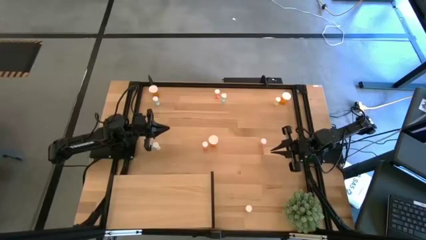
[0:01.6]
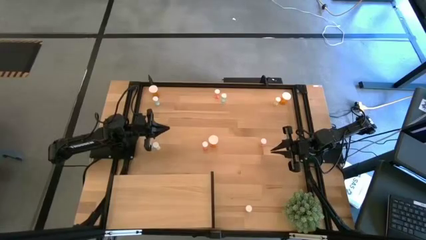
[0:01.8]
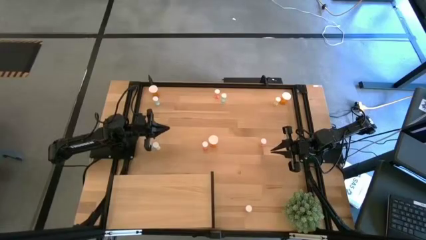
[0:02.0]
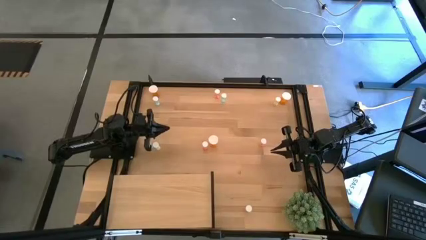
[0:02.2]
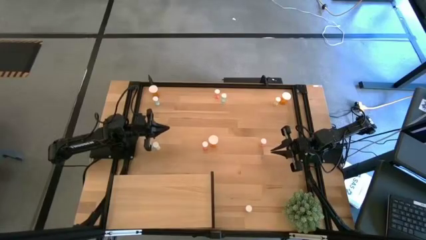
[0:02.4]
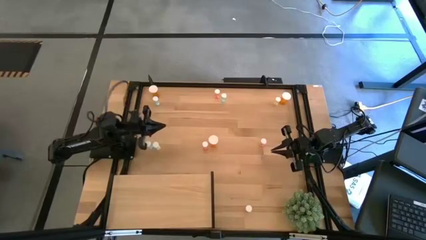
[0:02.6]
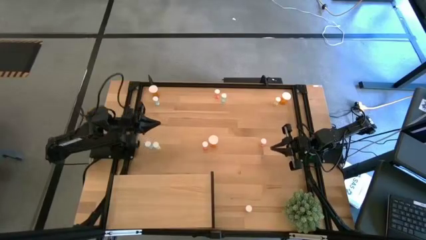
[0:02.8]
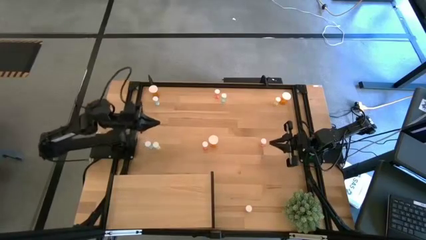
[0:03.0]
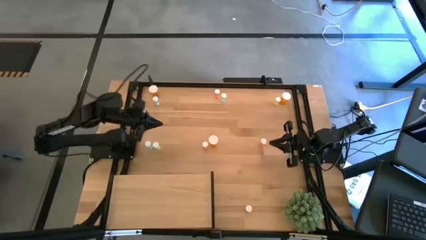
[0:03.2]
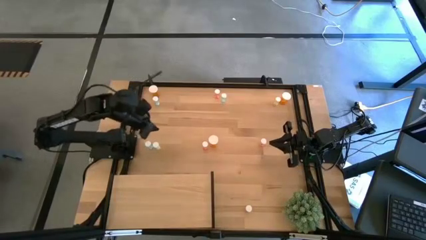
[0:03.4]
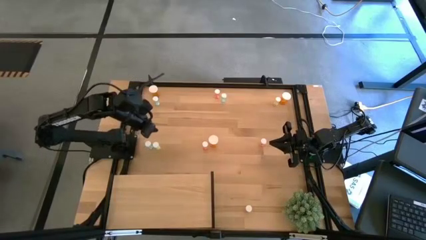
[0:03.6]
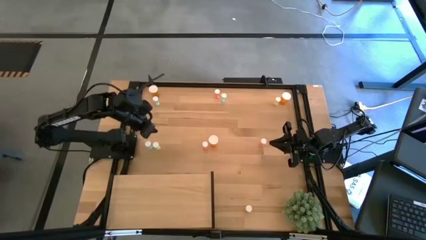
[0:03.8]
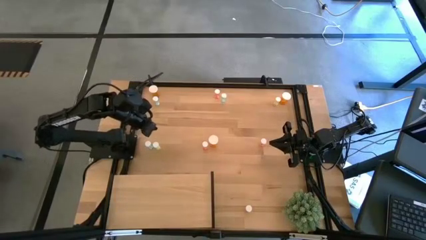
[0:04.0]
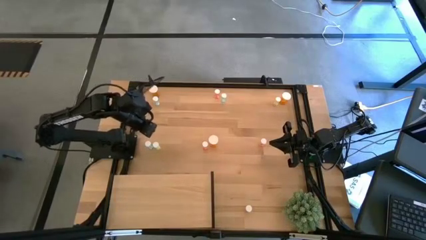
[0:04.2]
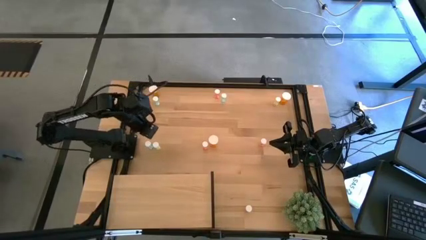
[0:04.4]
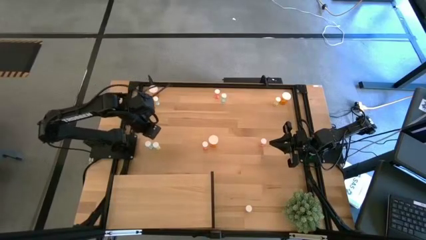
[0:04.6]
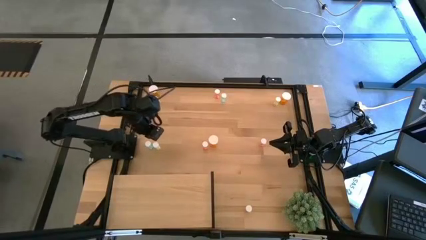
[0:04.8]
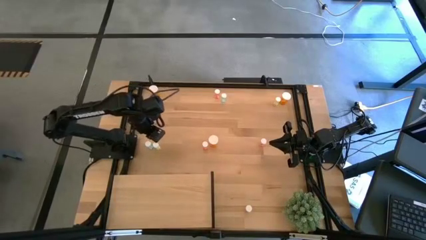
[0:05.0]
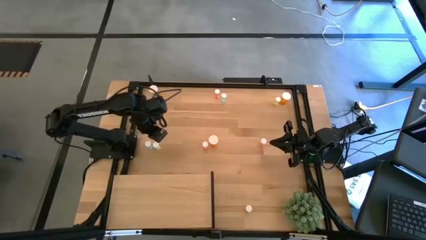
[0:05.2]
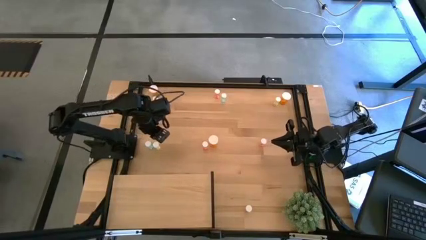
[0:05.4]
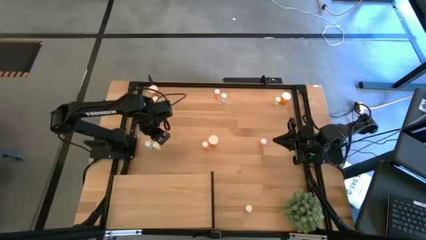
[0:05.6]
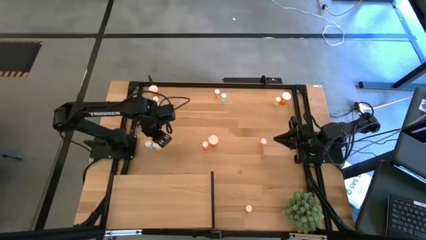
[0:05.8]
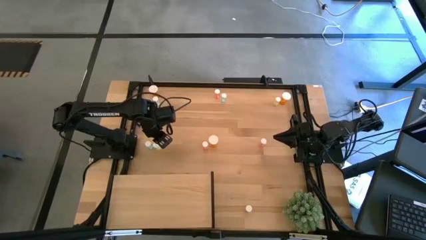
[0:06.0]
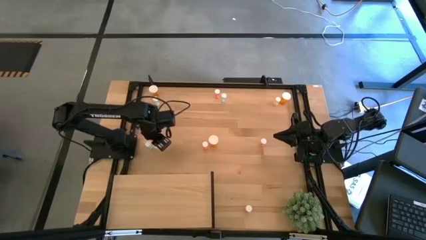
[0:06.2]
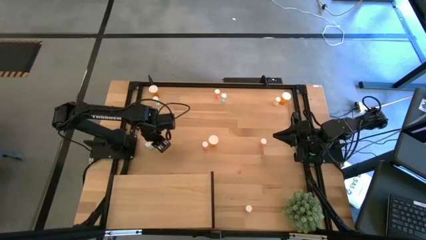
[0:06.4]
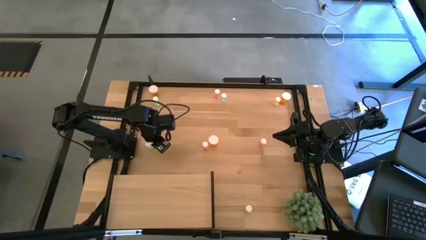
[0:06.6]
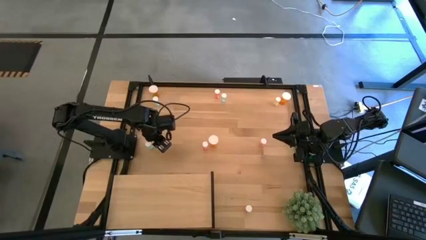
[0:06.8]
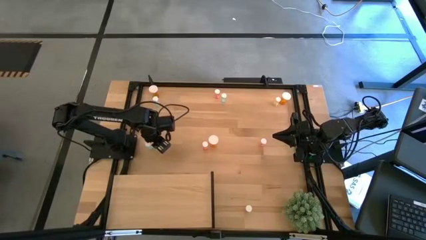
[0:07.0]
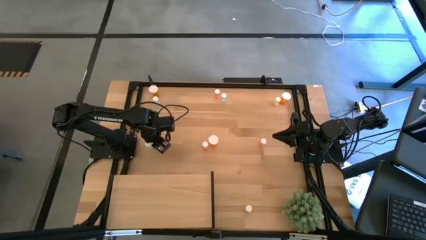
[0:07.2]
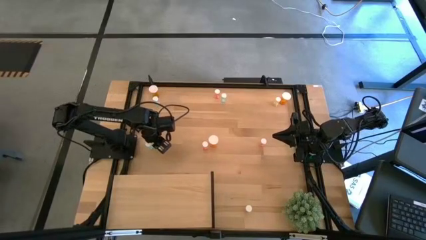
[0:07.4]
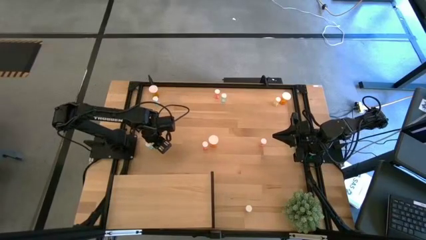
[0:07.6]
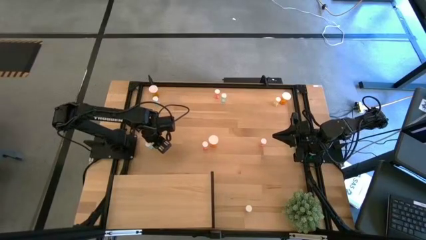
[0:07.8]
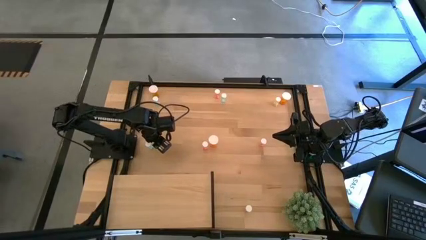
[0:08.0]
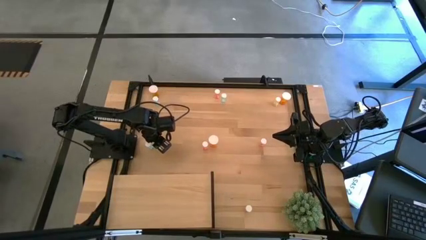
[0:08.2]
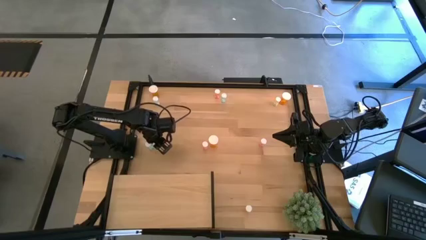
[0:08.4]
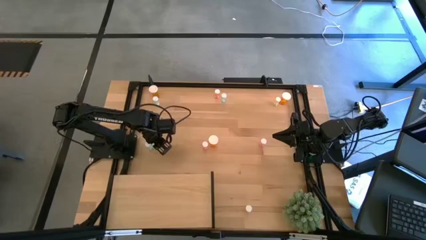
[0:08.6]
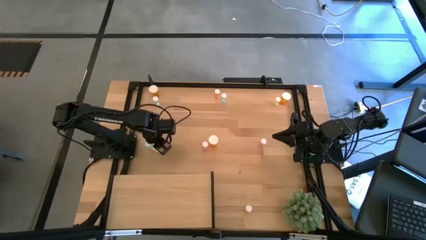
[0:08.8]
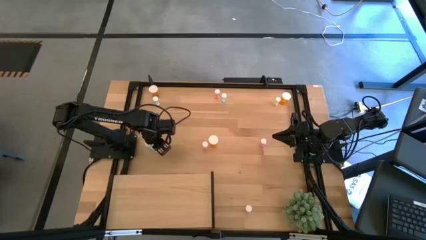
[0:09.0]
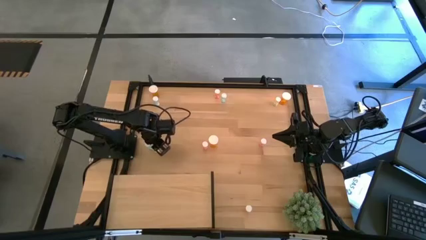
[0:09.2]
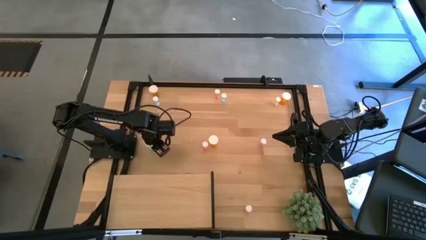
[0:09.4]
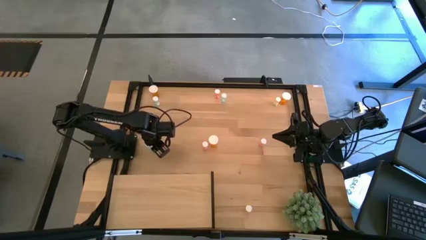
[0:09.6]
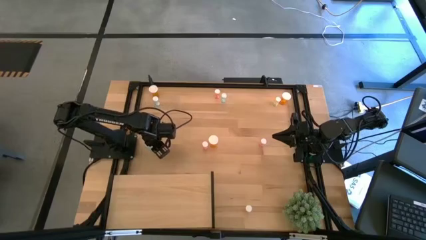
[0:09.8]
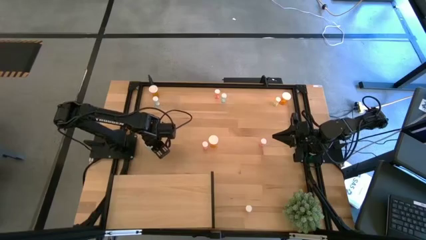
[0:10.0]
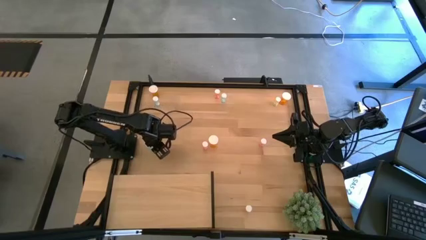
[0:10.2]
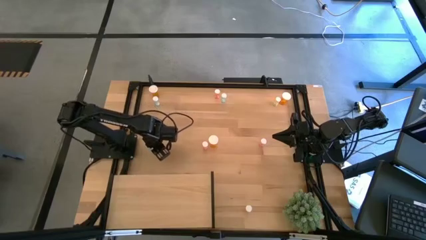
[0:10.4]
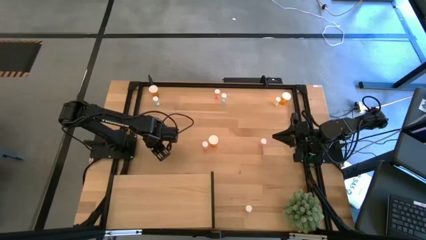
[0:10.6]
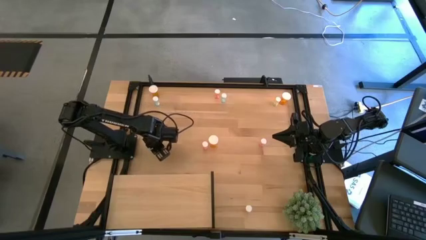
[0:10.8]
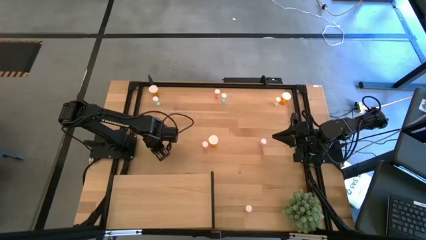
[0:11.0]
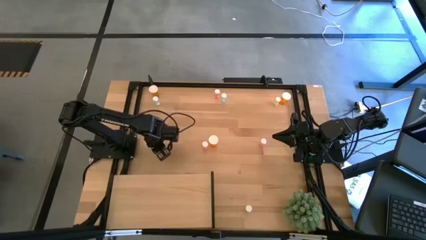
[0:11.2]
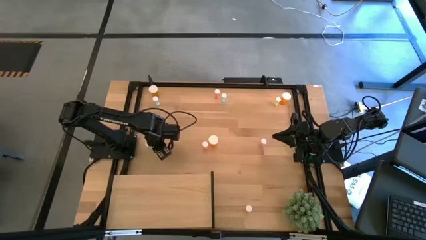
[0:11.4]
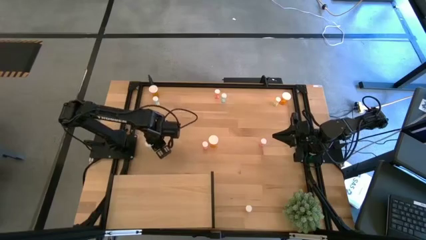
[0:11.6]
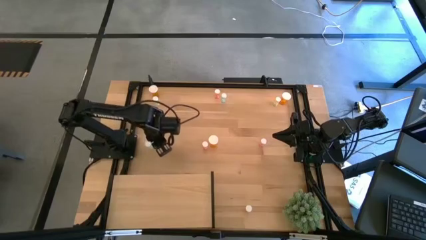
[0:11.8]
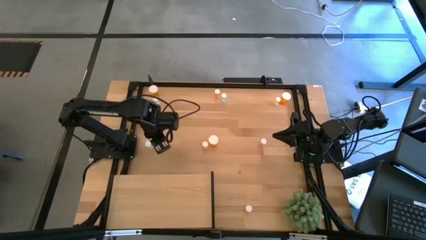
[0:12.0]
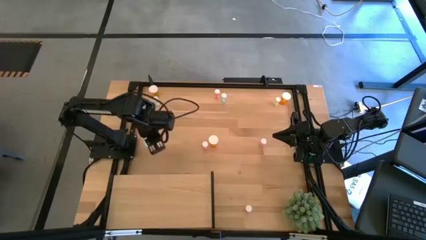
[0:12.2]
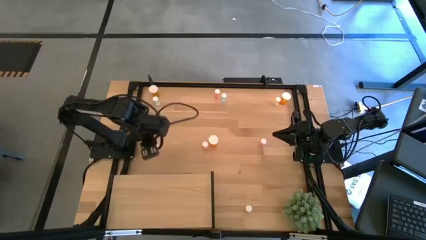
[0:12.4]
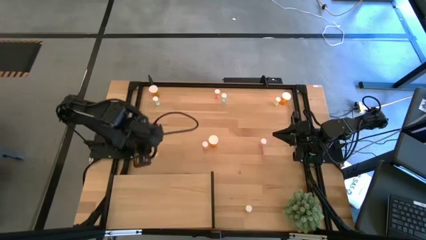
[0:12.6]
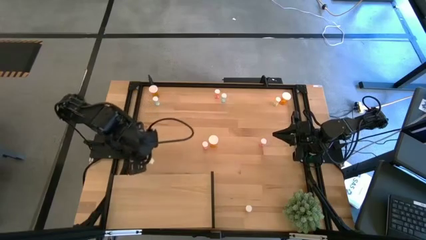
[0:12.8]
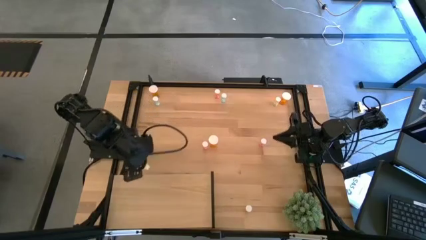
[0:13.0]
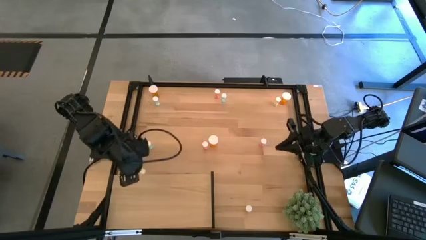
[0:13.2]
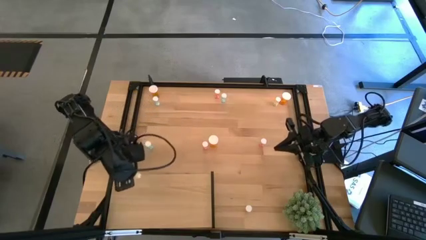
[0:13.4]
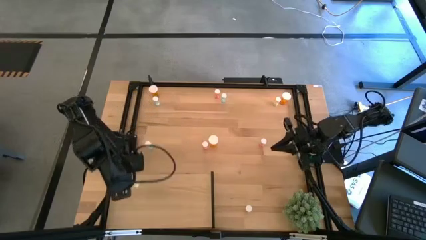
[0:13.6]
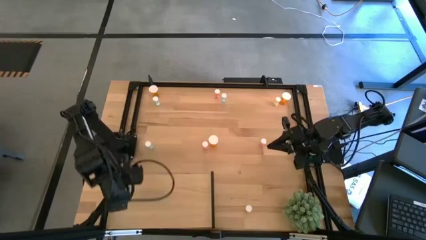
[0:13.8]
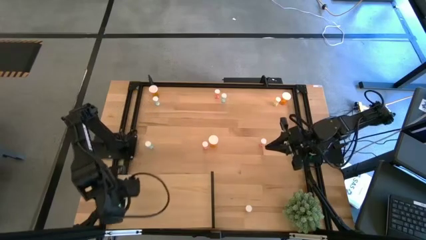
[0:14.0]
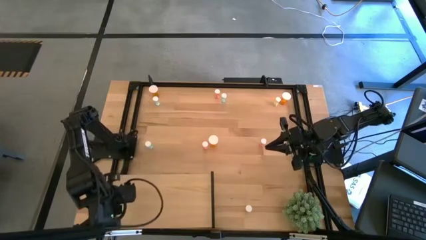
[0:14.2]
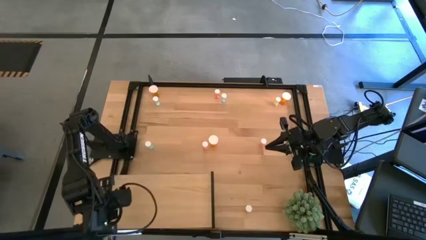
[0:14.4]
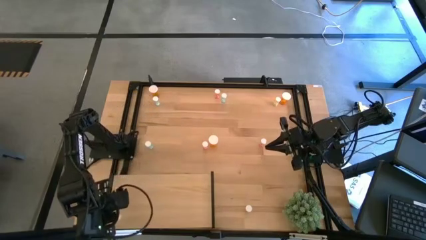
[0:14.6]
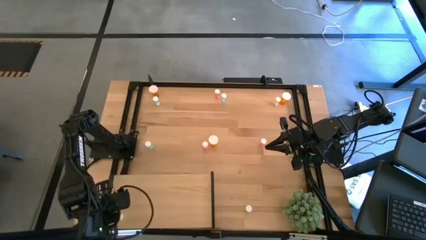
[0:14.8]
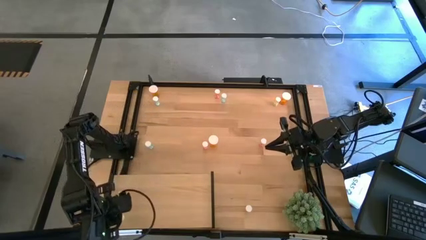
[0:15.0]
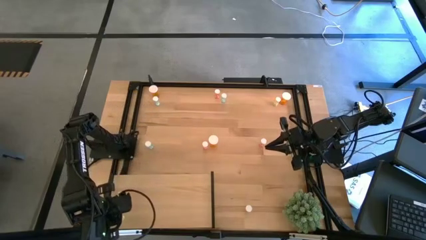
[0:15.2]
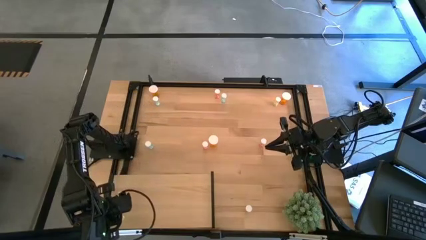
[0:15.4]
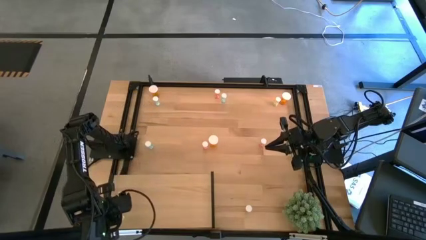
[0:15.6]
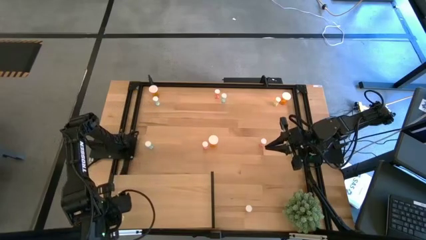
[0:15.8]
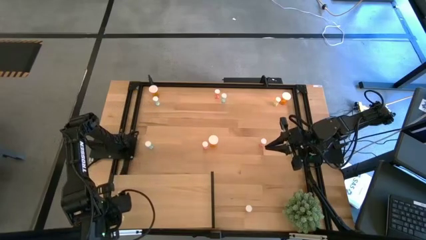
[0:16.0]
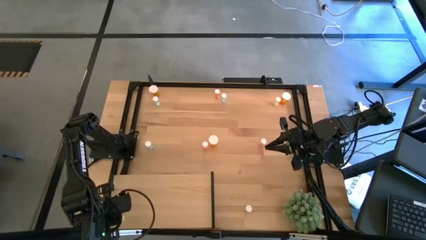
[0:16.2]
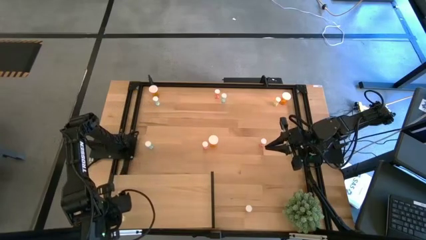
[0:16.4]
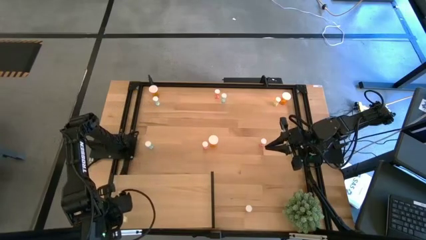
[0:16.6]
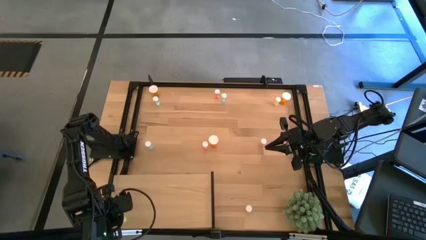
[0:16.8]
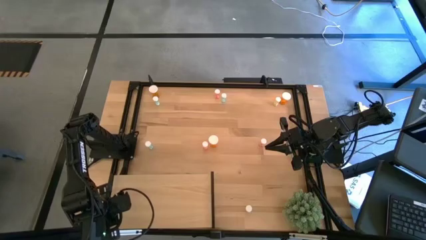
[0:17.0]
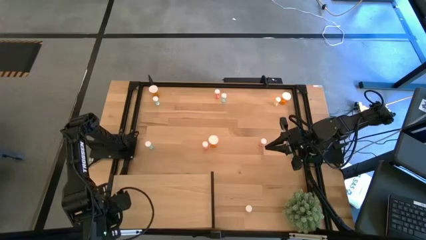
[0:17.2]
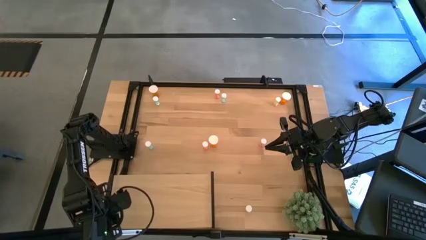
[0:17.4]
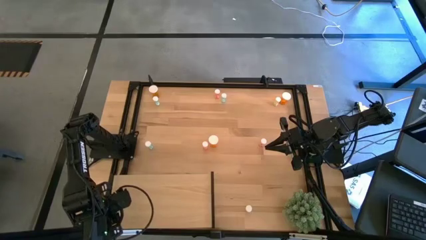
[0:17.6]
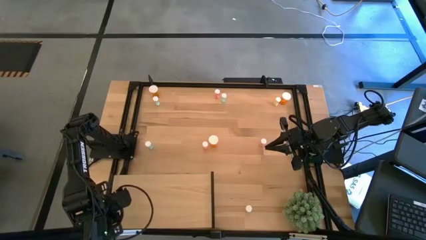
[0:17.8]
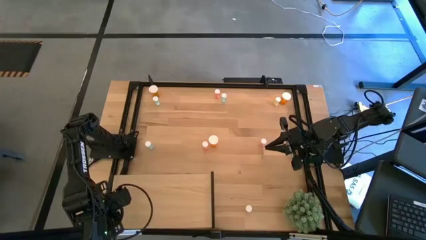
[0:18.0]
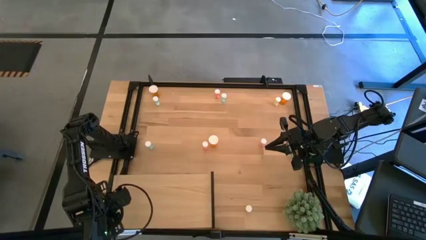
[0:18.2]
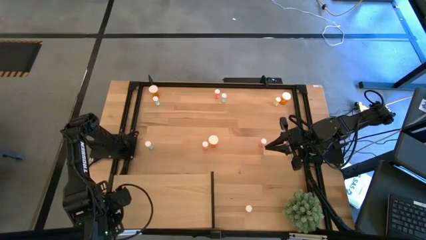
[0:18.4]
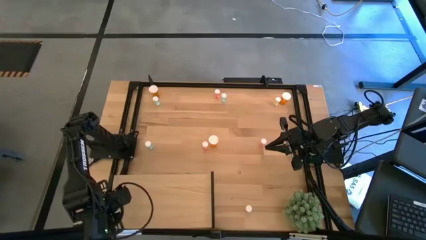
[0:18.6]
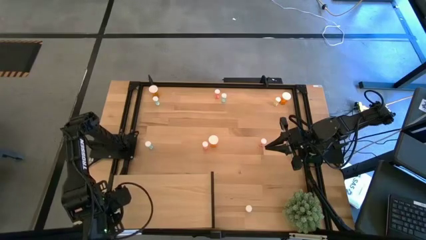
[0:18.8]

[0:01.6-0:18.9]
Task: Pick and place medicine bottles onto shelf by color
Put the left yellow pill bottle on the shelf
